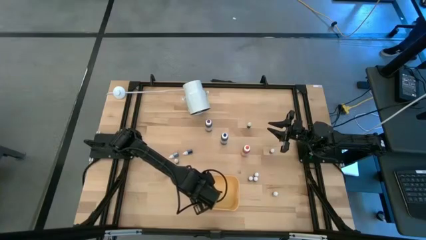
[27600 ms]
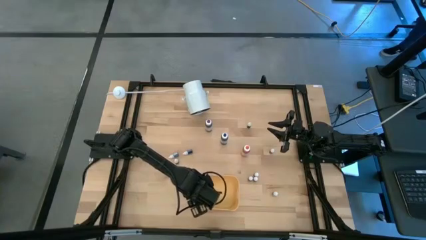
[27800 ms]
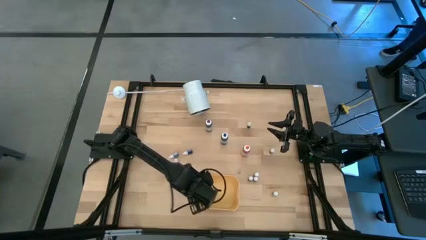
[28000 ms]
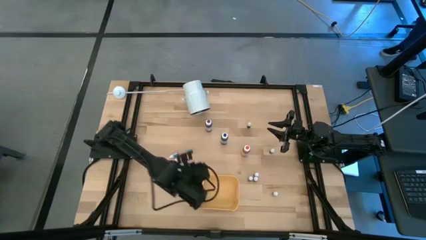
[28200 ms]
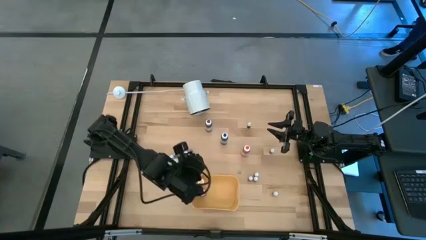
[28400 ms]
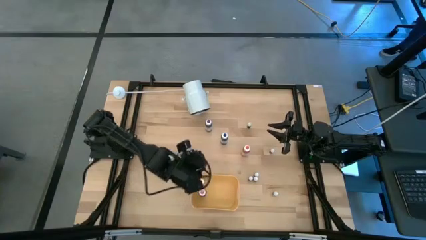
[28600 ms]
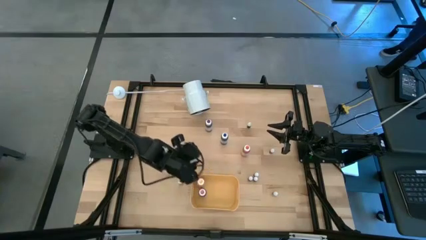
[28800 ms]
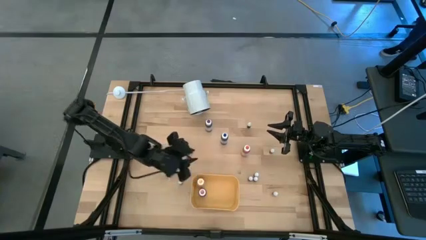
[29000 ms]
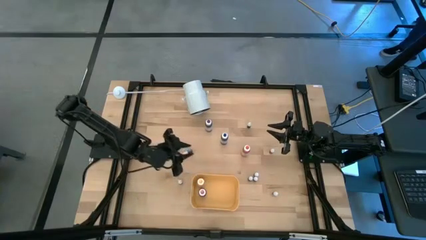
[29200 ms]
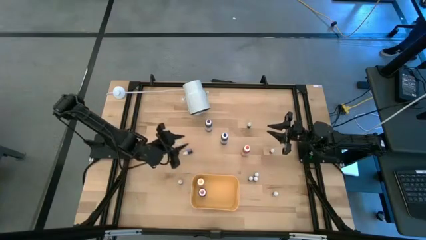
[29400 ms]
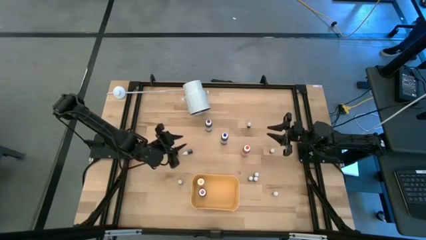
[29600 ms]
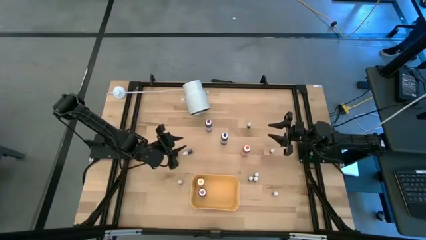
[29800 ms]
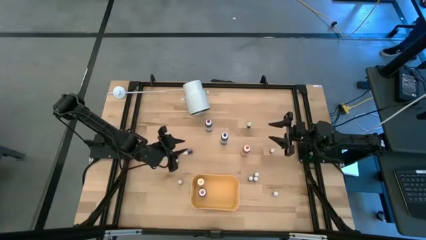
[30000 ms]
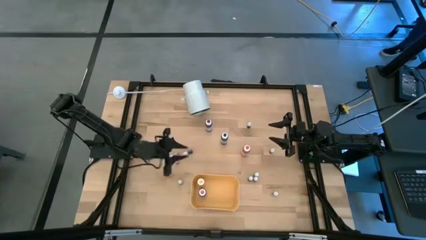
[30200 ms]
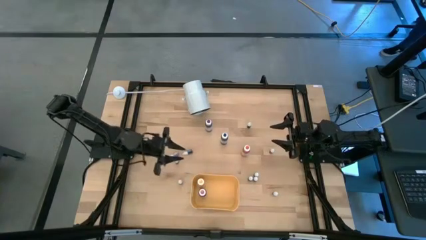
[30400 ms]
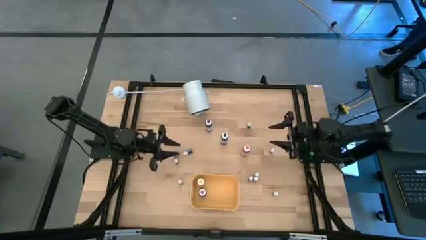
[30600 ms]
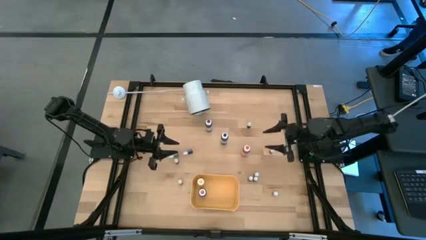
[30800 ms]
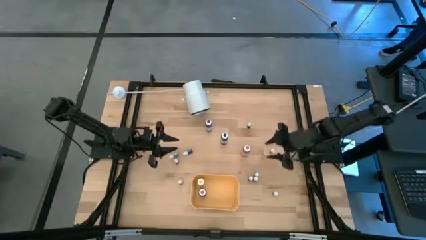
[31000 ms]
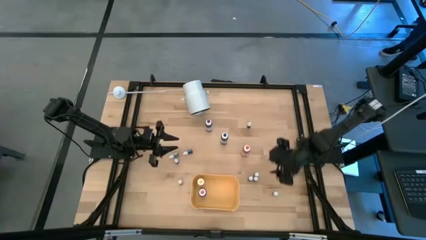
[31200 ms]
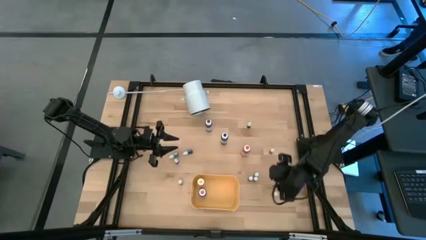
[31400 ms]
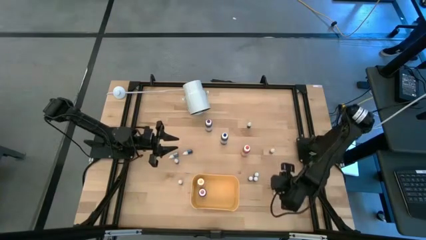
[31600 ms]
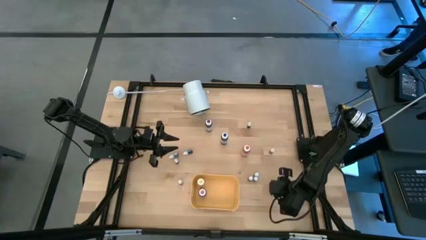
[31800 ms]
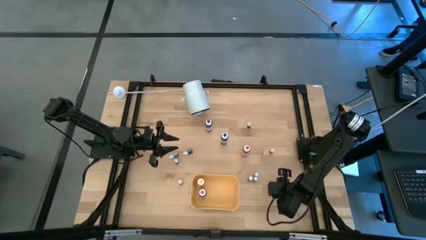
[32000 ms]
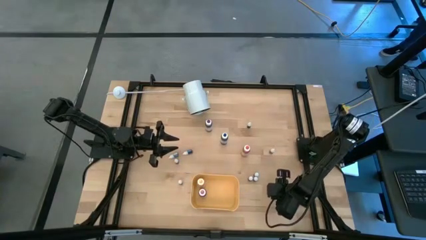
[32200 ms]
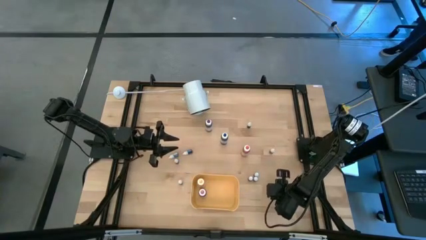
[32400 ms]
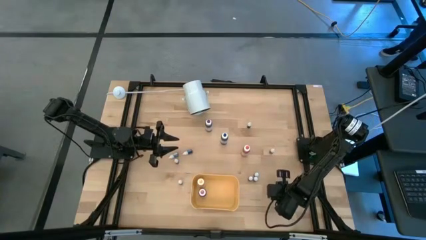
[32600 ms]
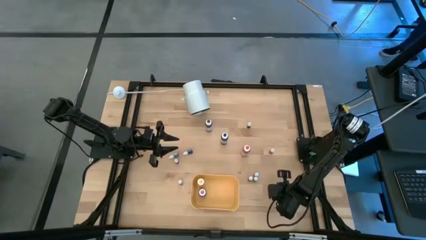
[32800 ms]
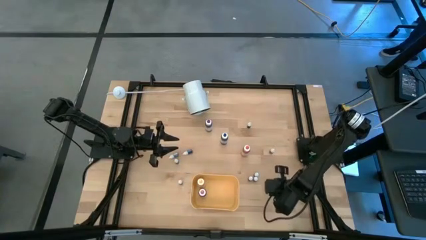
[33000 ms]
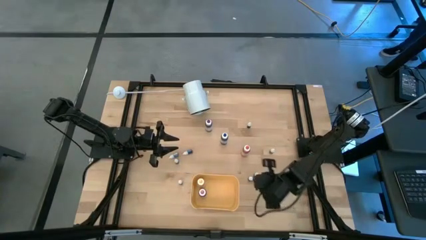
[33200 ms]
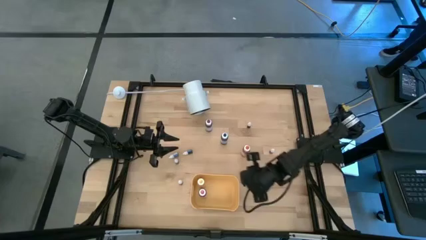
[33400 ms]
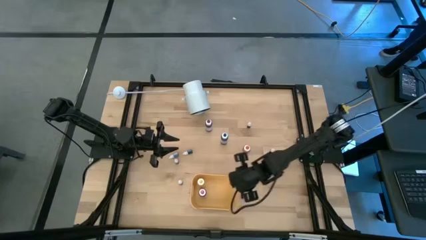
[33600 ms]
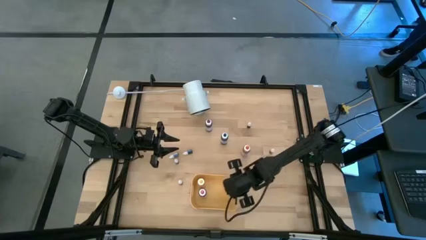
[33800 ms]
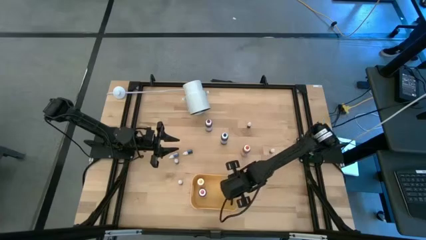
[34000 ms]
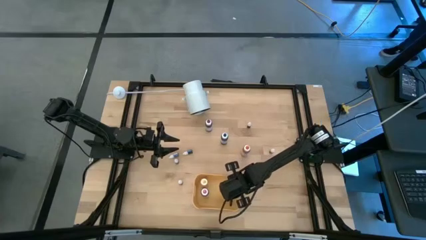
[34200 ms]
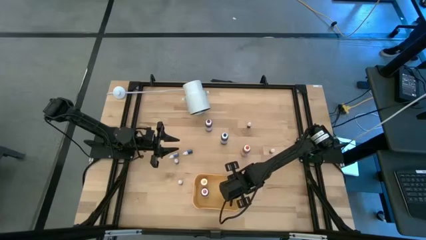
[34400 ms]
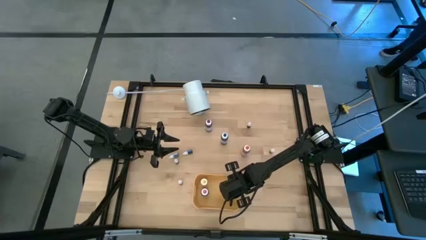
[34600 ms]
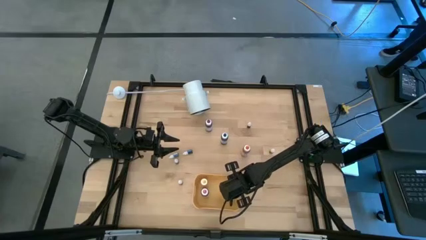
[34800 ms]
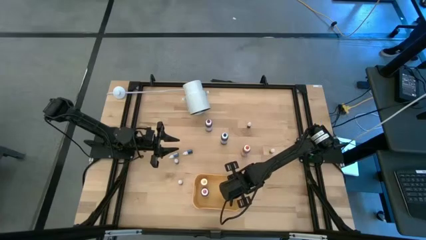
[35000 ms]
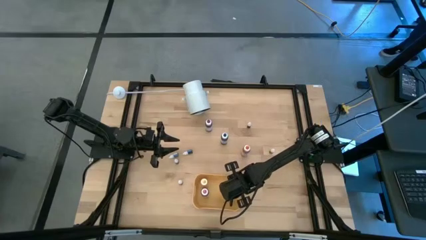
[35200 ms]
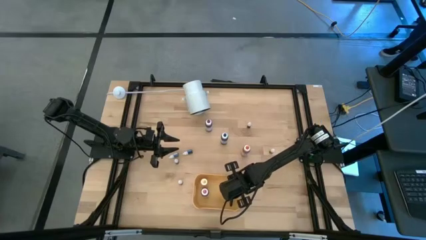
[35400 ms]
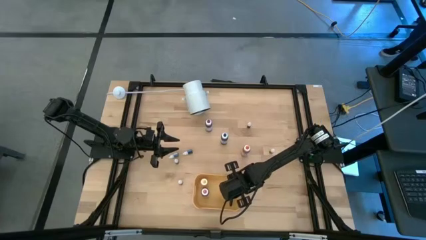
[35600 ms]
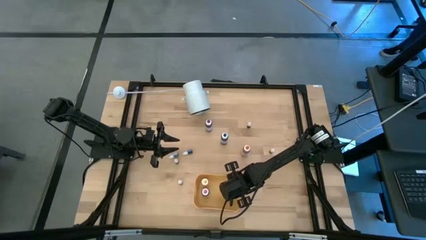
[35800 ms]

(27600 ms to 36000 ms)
Task: Pick & Place food coloring
Put the small red food coloring bottle into the yellow bin

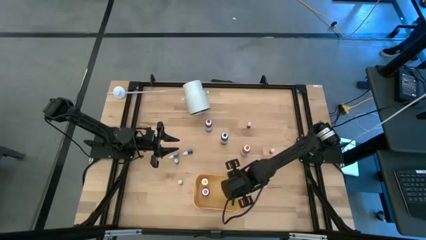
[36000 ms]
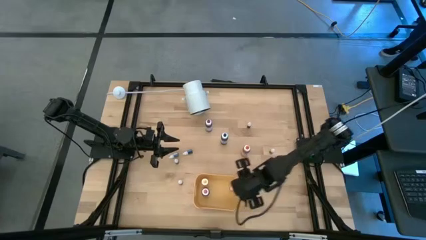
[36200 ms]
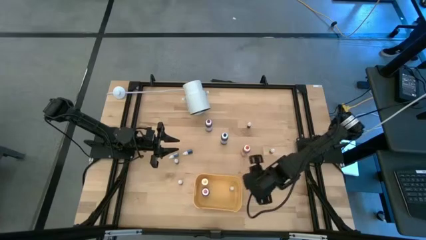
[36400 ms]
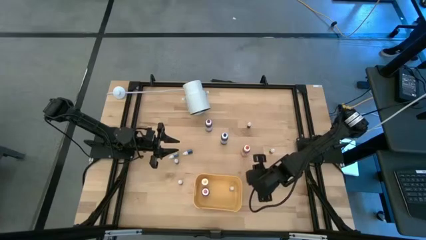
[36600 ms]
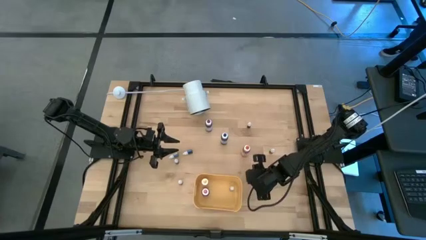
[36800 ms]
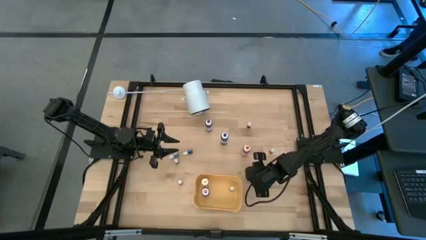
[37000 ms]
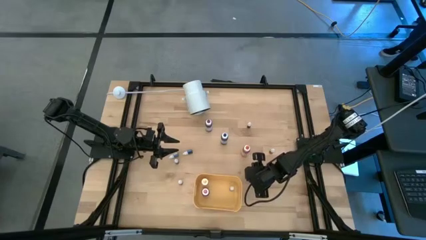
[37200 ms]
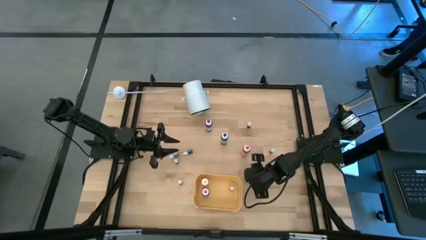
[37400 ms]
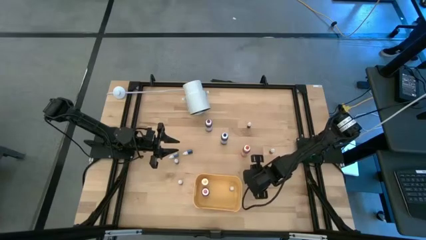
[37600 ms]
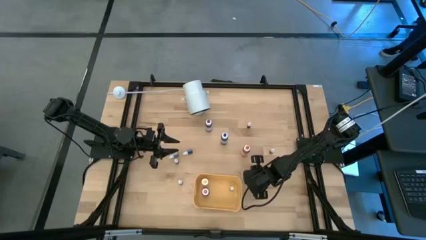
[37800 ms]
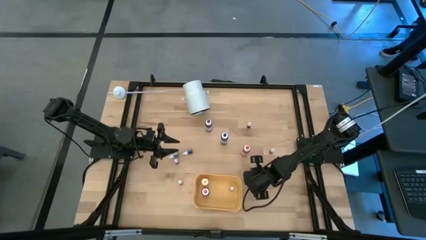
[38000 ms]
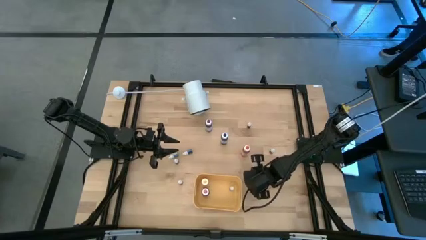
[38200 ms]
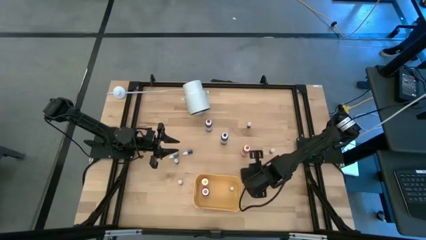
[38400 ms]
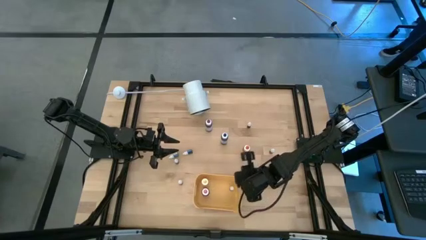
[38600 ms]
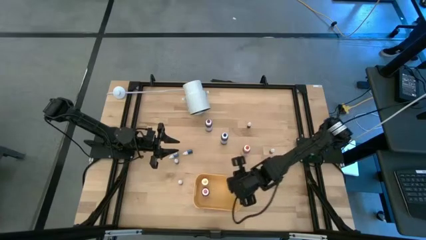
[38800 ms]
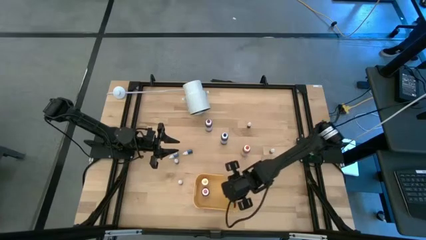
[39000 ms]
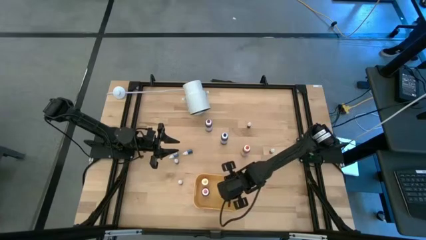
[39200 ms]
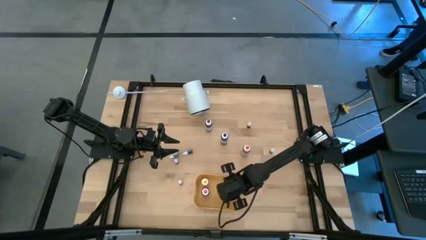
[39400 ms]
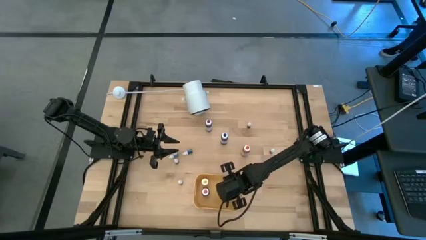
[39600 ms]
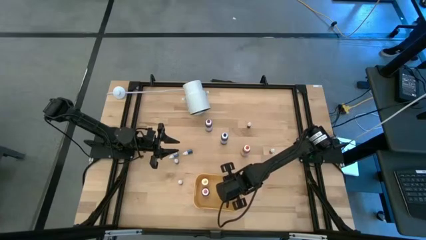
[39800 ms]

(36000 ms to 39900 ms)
Put the middle small purple food coloring bottle into the yellow bin
